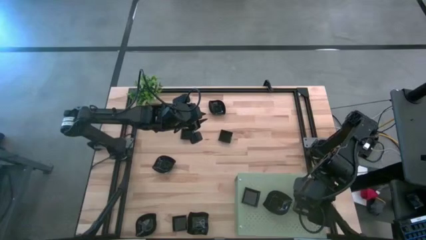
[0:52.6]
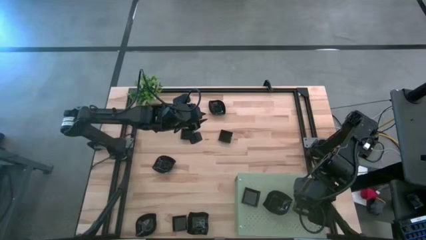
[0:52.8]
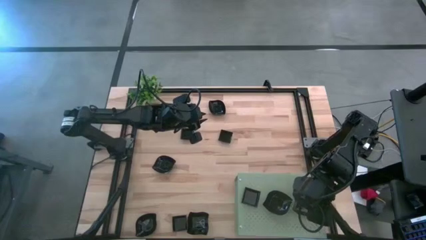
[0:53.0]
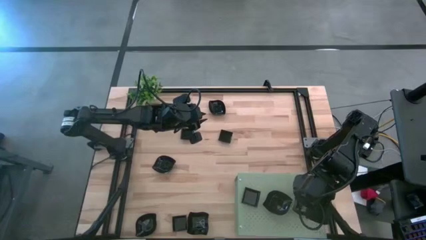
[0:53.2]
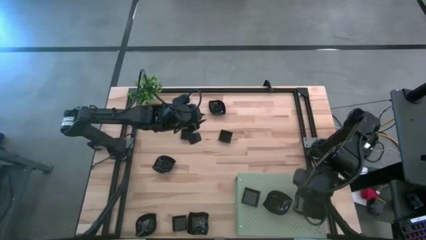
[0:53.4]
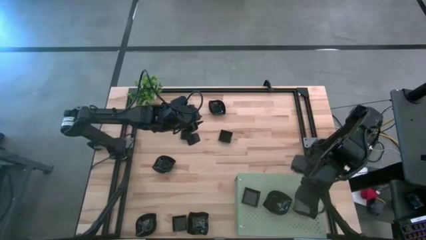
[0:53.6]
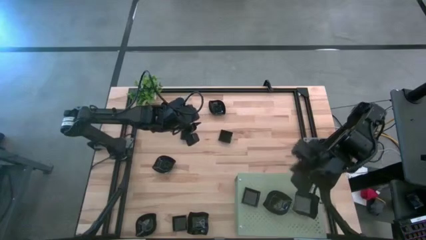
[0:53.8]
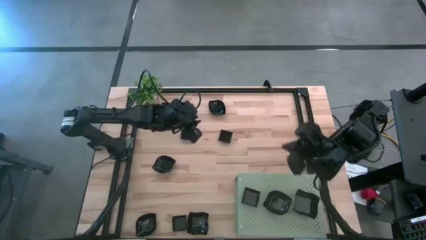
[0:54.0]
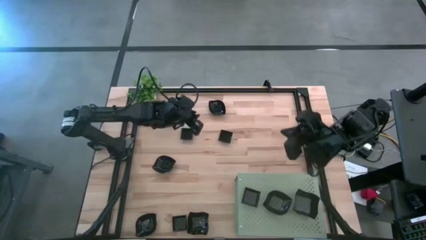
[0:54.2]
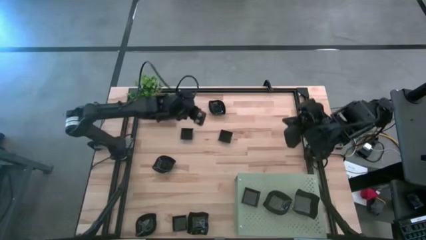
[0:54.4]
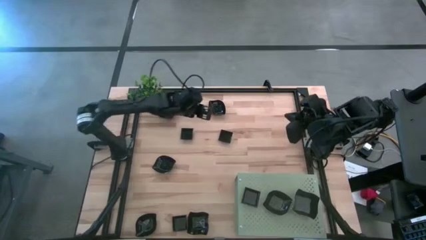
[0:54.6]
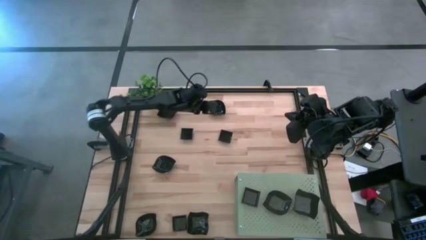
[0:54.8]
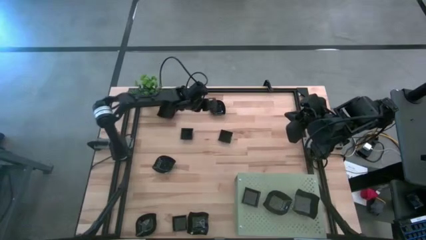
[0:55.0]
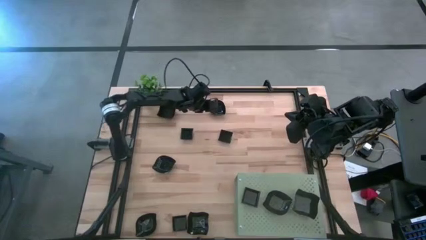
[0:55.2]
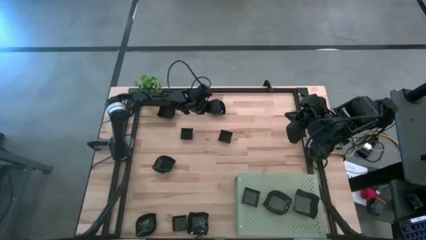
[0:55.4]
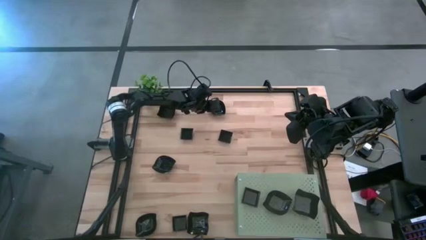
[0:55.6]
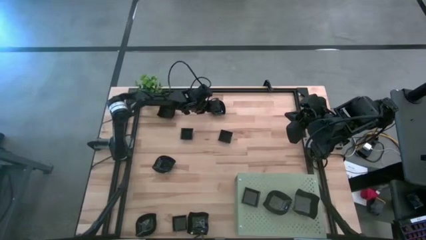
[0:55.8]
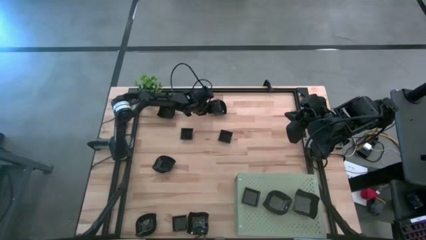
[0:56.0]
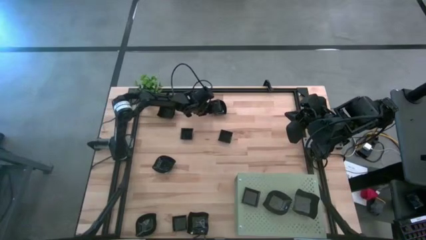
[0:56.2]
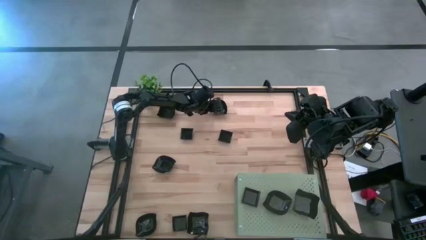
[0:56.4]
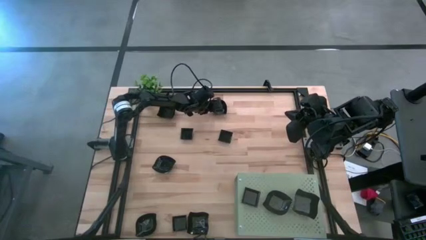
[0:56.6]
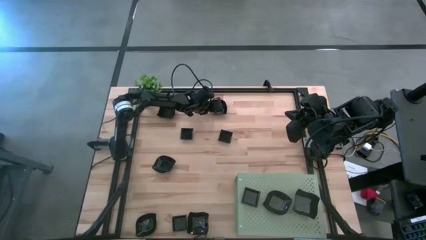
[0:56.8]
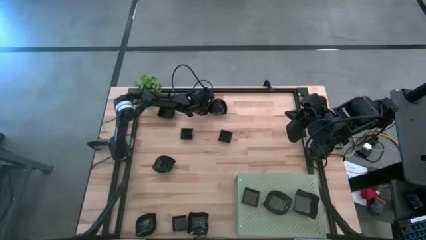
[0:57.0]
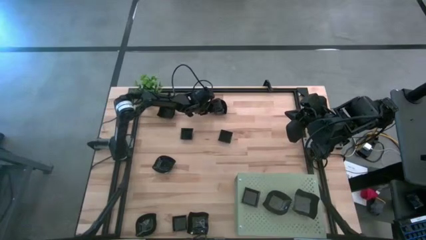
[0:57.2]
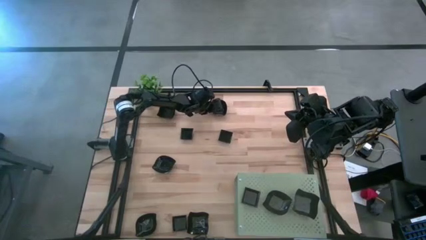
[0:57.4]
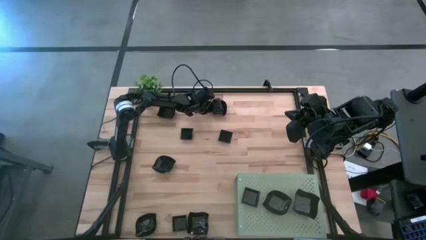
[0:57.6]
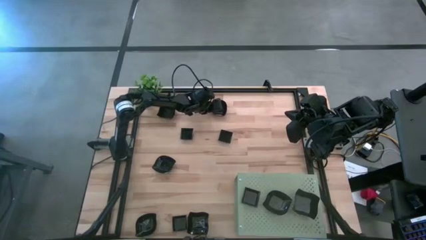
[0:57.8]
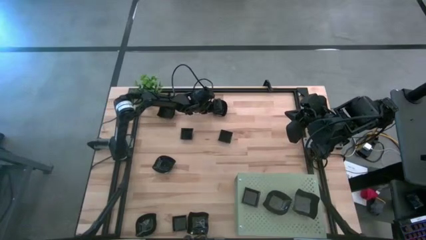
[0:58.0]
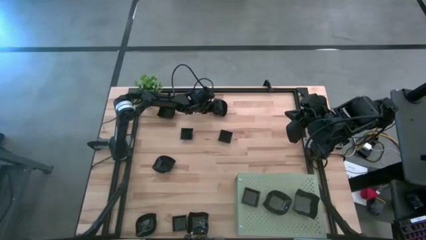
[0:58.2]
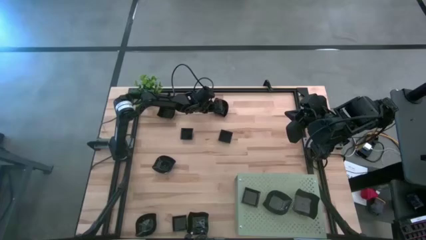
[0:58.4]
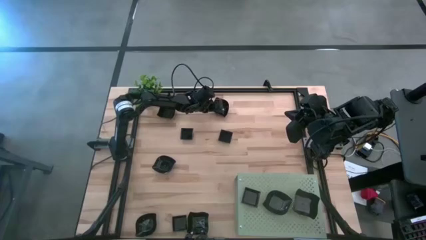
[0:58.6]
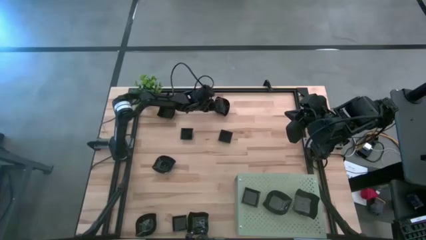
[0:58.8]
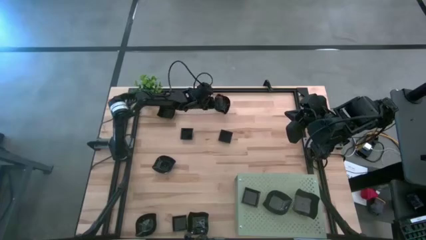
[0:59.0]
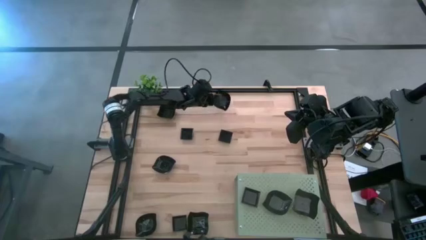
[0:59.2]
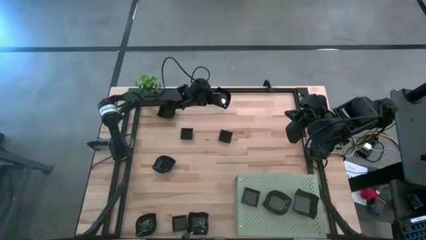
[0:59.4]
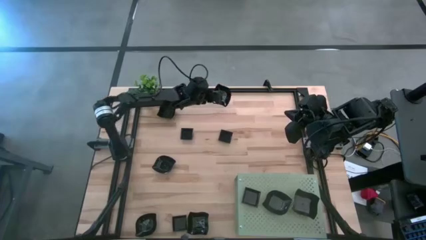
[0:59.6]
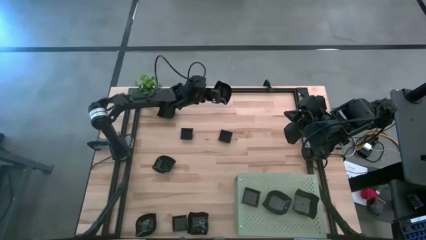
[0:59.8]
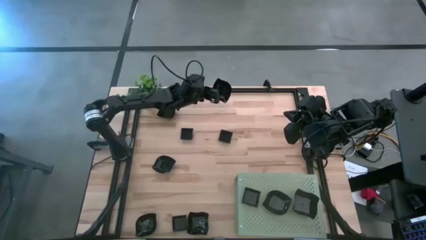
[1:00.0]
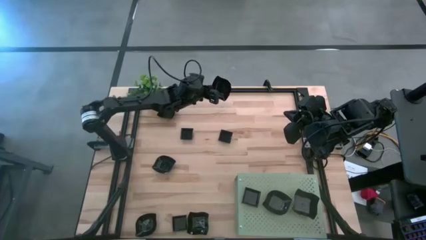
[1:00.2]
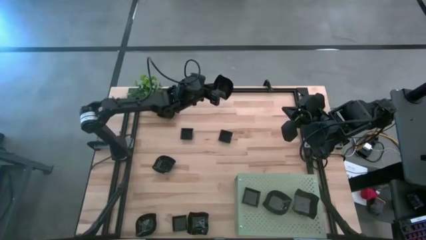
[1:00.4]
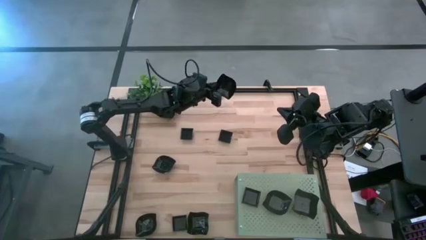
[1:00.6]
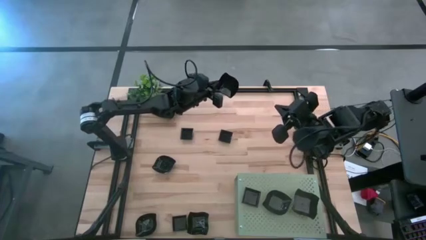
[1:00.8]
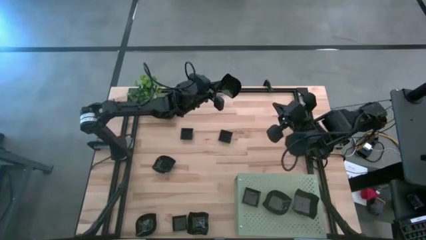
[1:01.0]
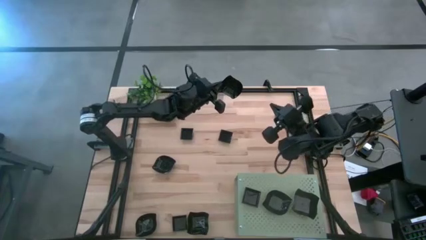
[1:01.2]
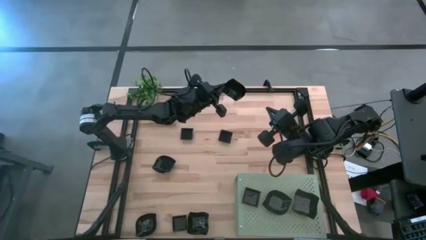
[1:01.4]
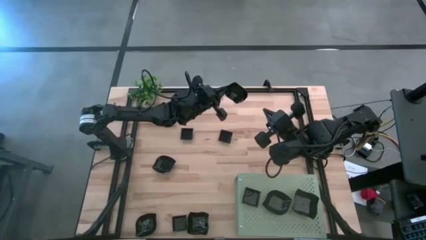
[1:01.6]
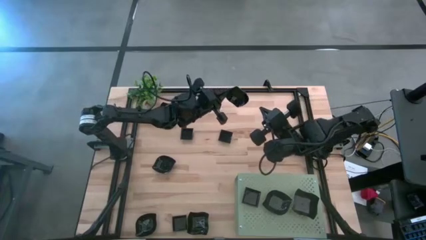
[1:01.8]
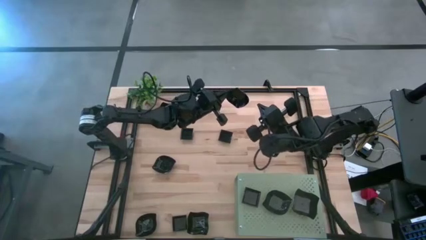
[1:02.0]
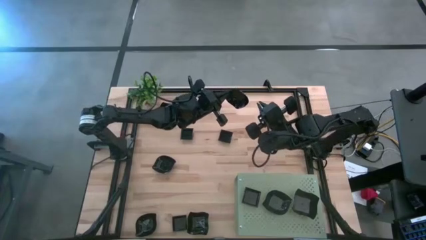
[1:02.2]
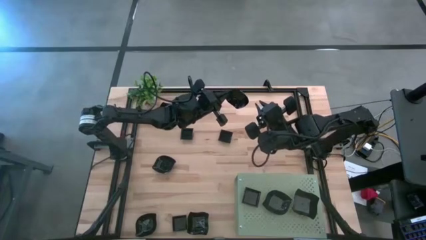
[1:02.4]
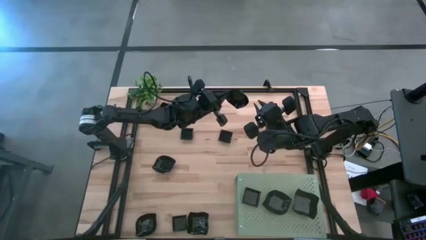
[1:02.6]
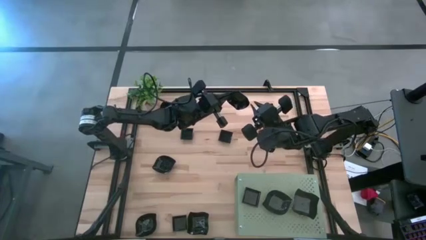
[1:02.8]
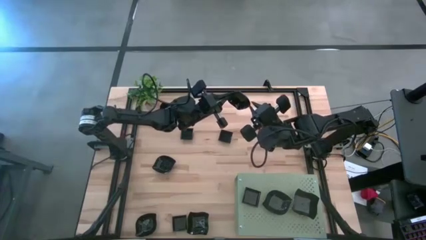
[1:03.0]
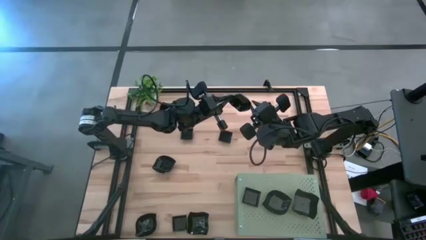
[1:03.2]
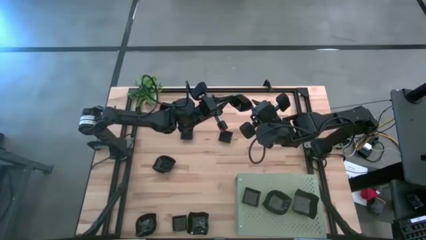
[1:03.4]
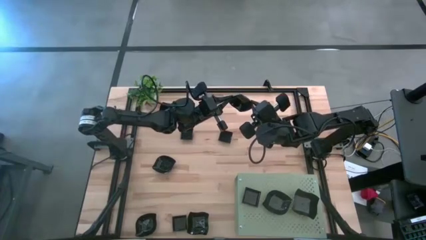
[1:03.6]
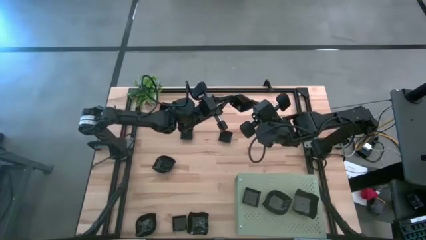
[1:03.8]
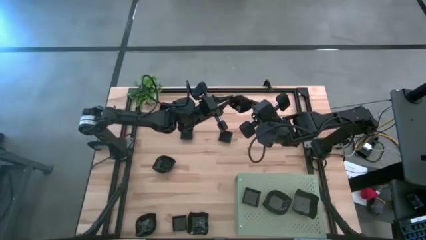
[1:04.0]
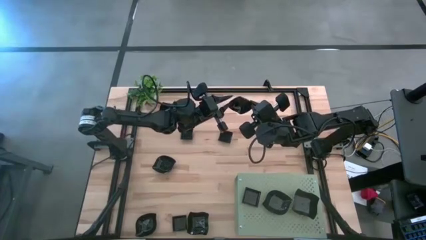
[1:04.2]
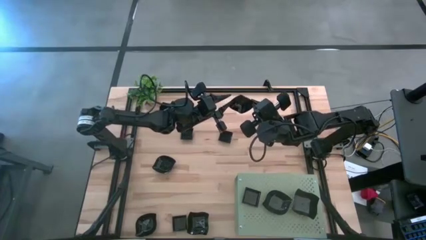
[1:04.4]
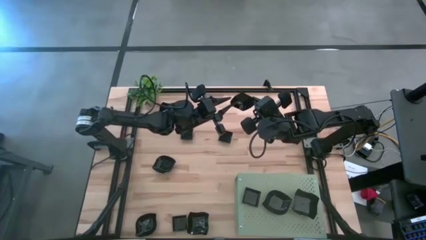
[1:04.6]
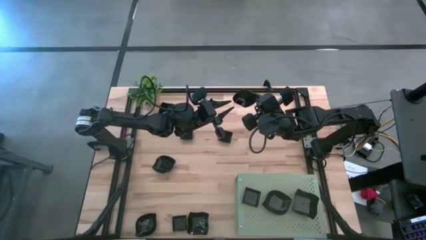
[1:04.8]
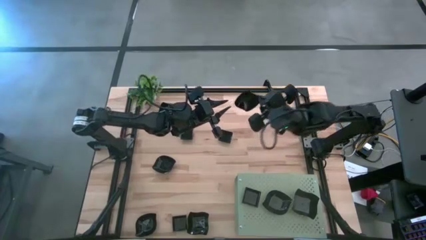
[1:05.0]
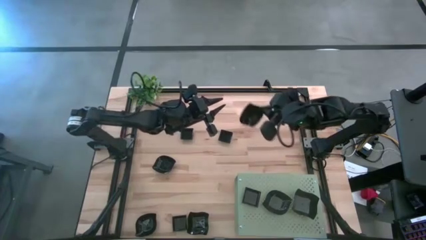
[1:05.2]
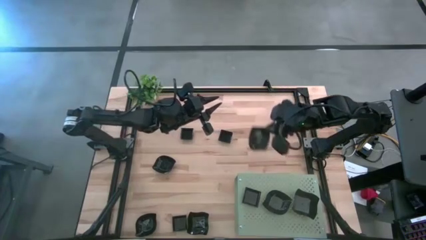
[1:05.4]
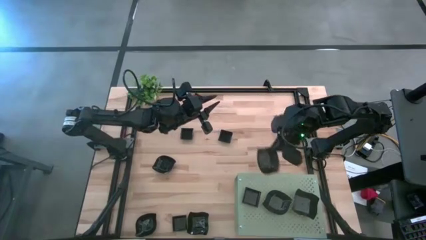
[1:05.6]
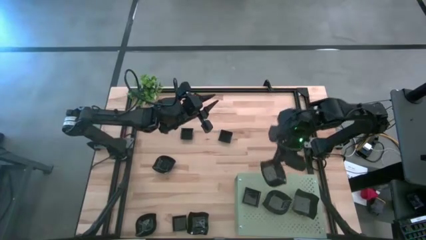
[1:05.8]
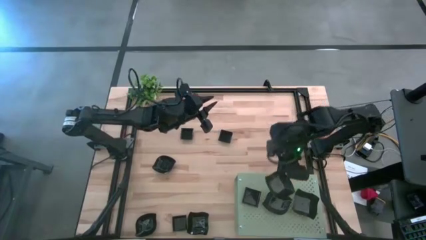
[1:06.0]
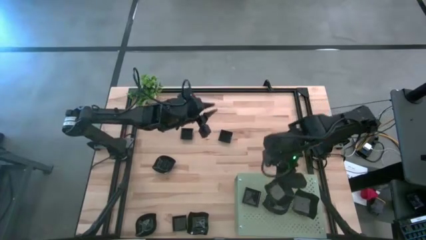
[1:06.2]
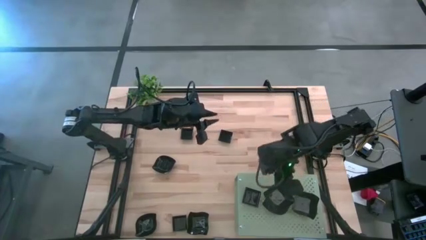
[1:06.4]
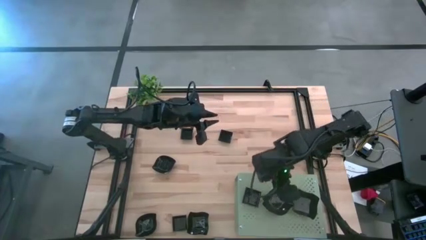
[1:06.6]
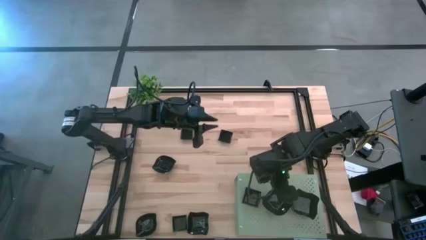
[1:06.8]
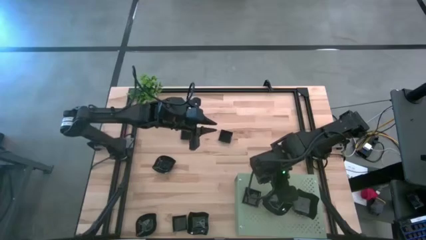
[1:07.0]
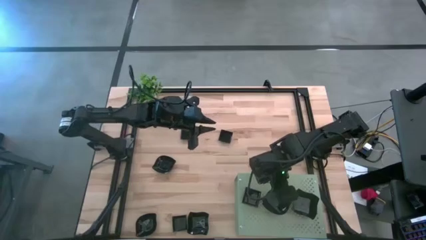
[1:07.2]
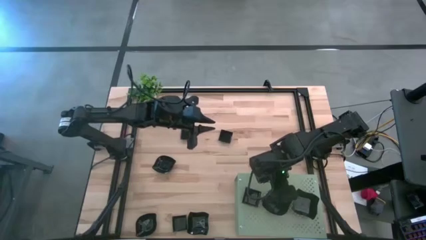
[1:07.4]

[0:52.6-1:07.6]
Task: Pick & Place Mini shaped plates
Stack the leaf-shaped plate on the leaf-shaped plate on the shelf
